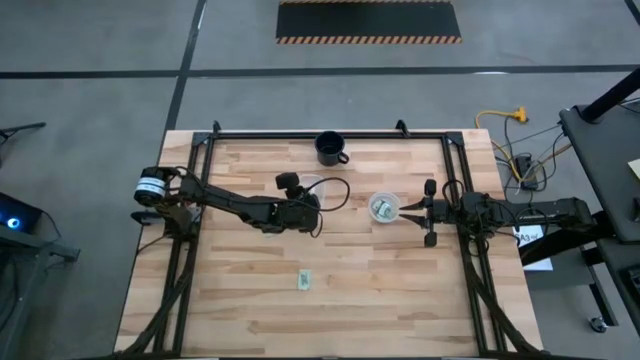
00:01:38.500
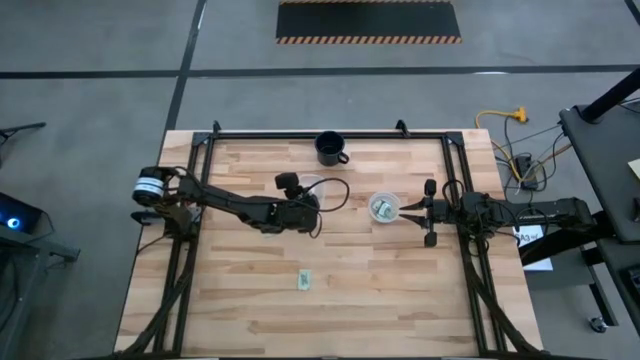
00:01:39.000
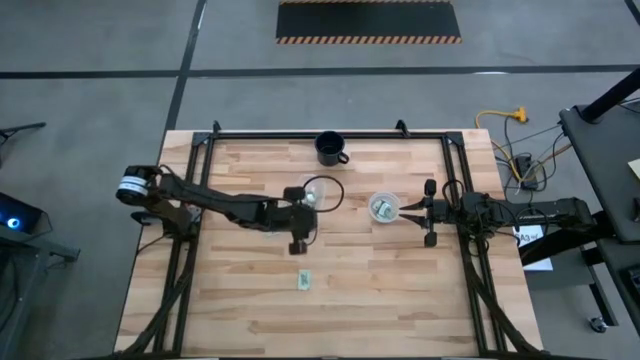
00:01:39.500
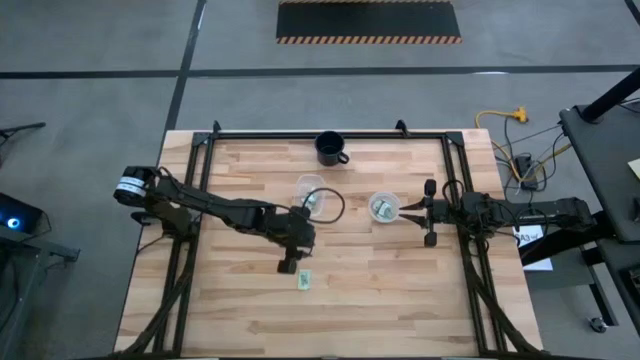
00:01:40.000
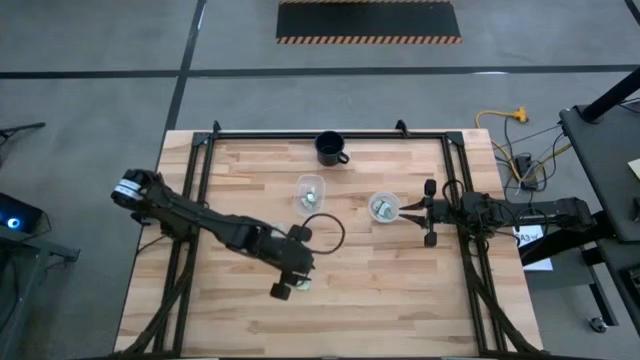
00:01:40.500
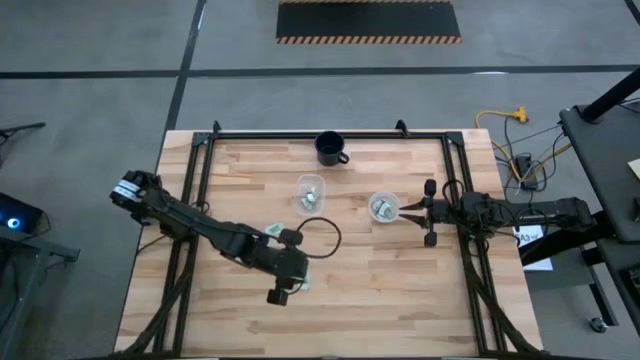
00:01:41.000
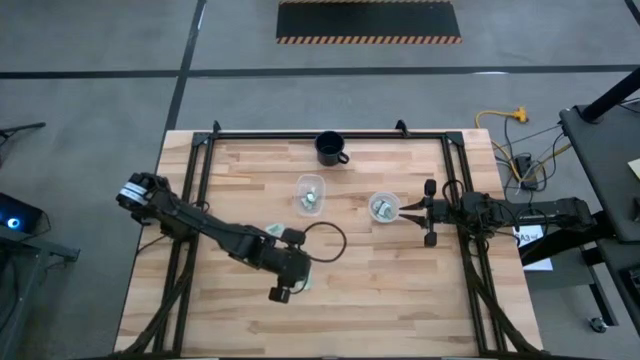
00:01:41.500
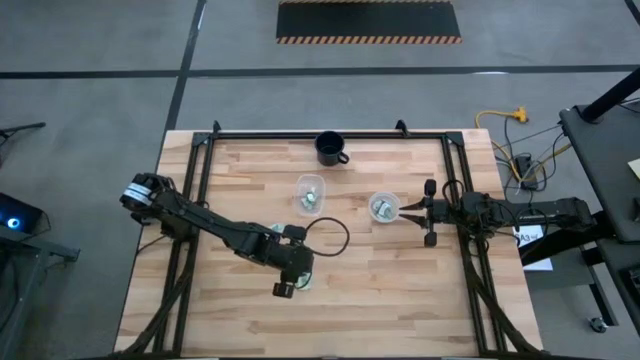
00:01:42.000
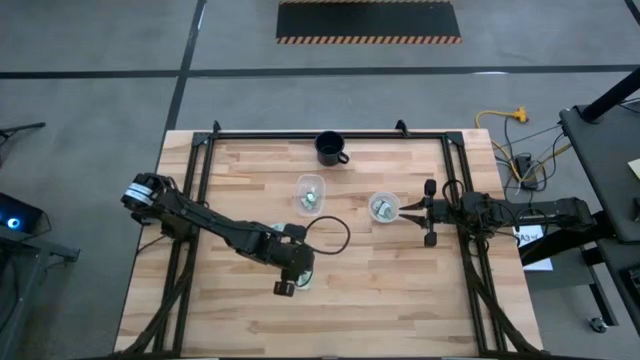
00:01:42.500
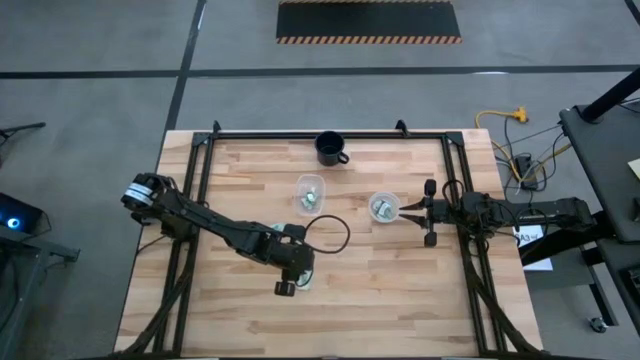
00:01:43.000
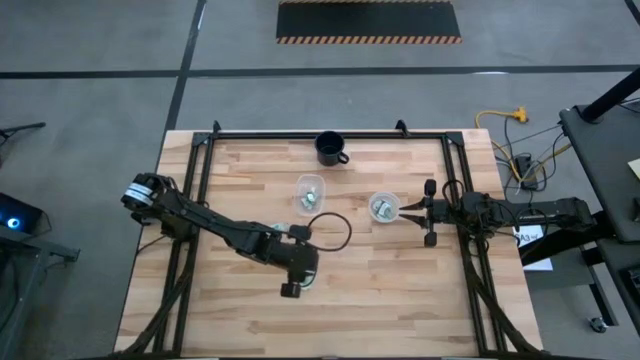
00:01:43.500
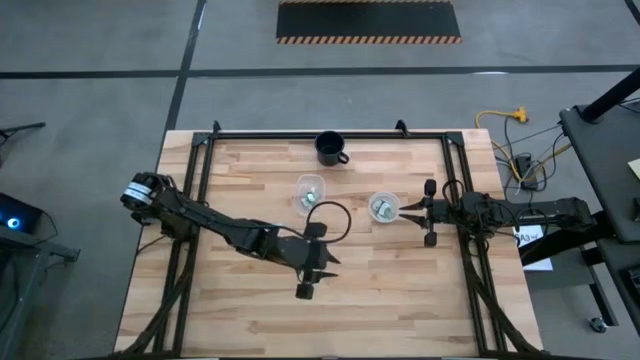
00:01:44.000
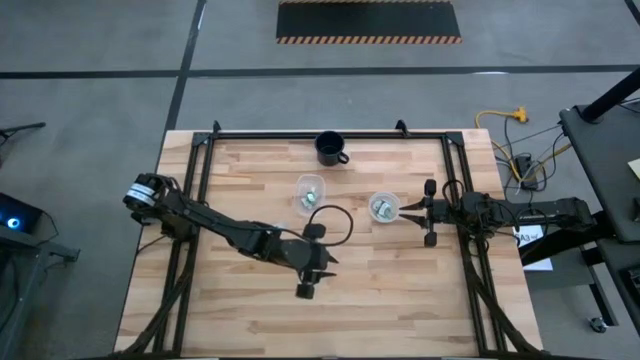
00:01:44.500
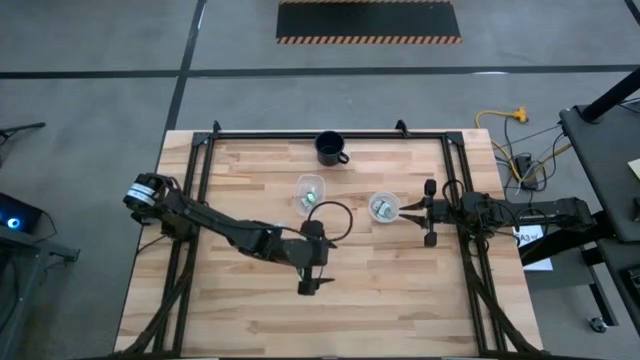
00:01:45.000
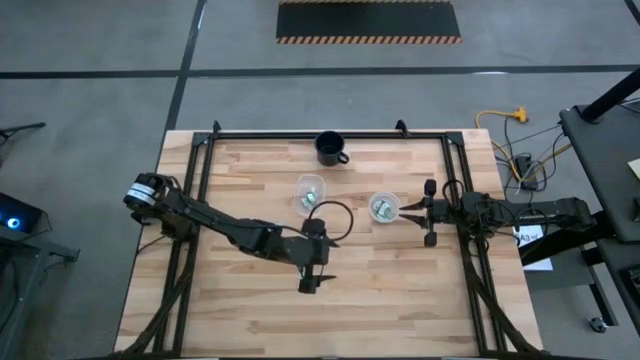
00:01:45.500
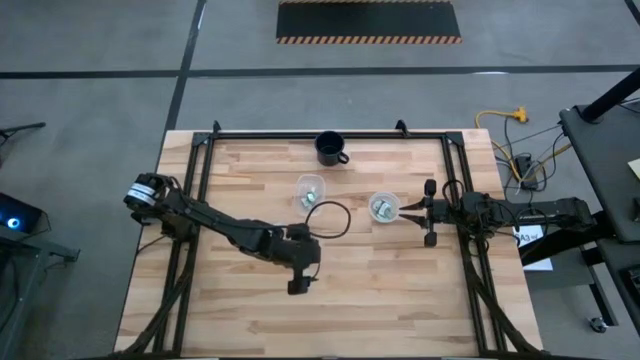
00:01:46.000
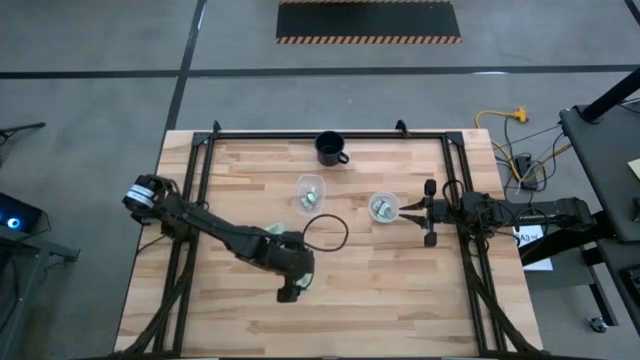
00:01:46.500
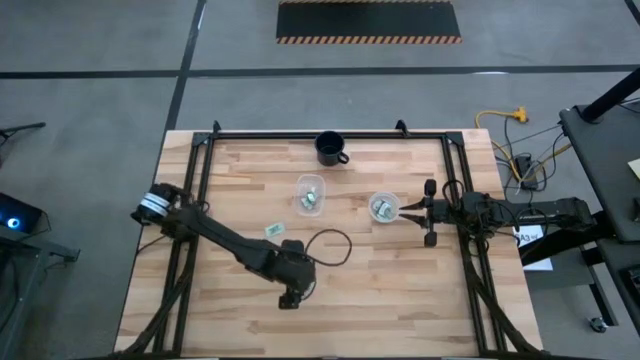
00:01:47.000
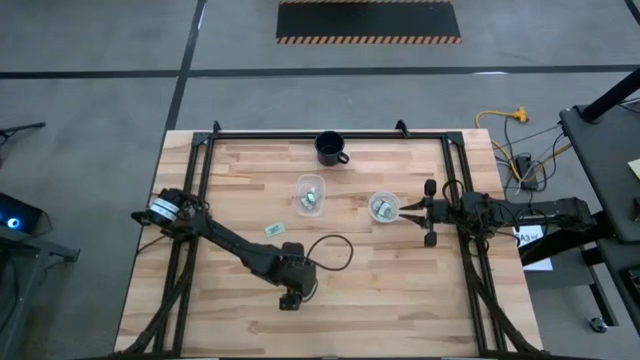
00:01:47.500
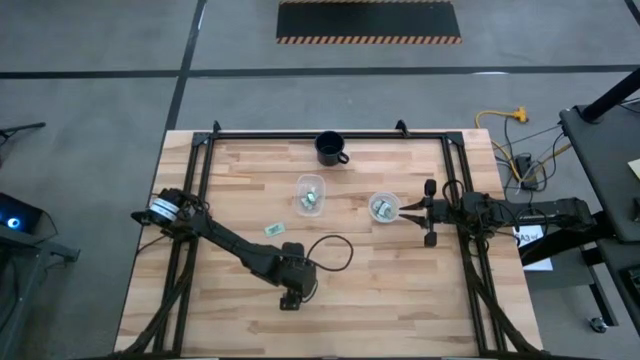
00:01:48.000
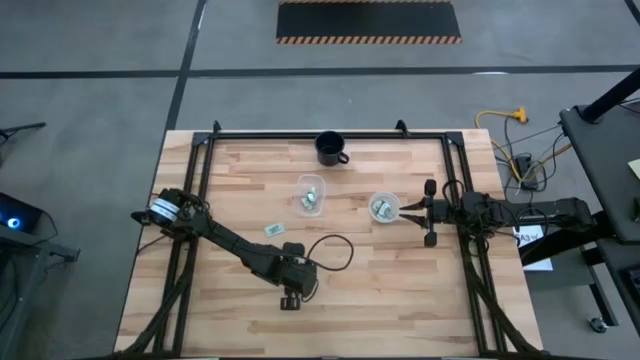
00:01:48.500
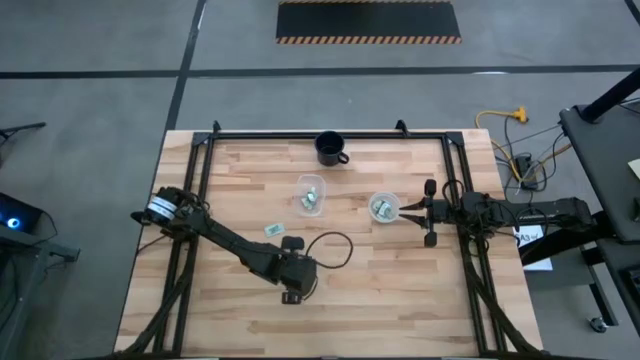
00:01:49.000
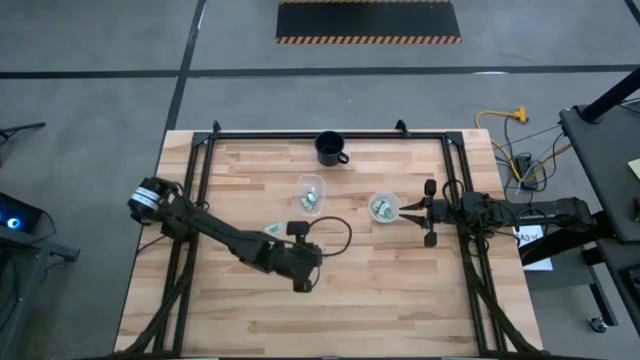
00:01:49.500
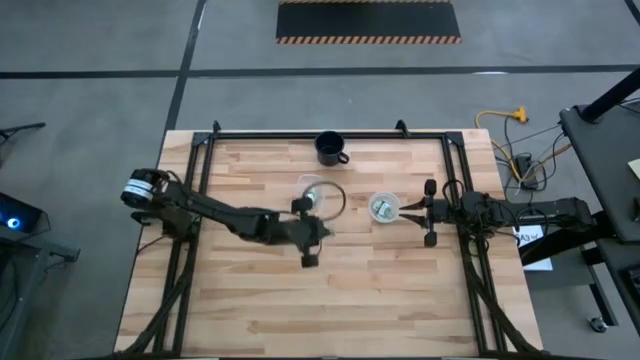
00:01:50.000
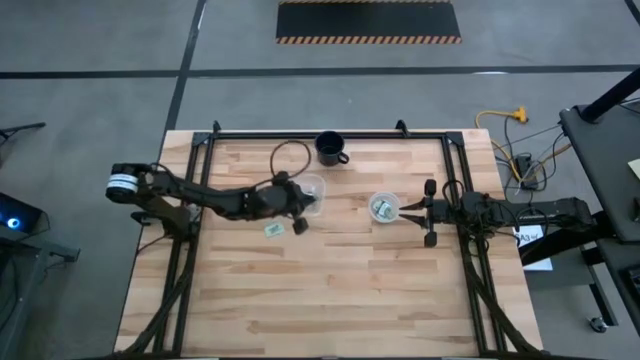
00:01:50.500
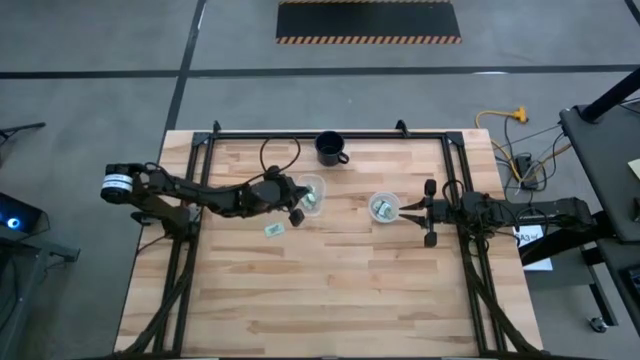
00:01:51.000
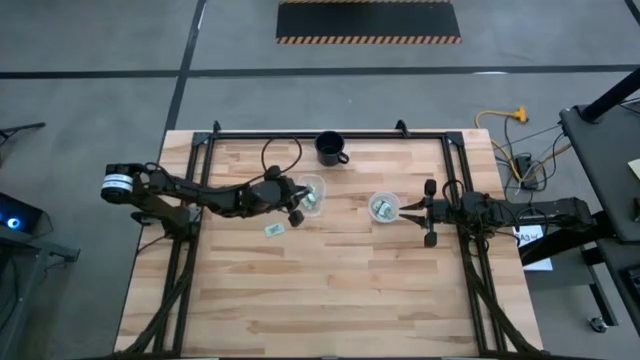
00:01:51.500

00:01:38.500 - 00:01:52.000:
Task: Pick and place items into bin
Put the white stevia packet into the left transparent bin

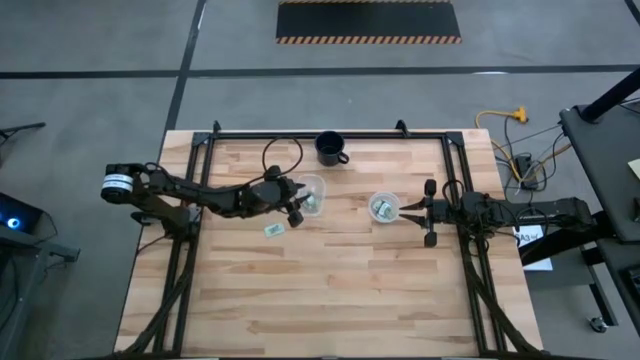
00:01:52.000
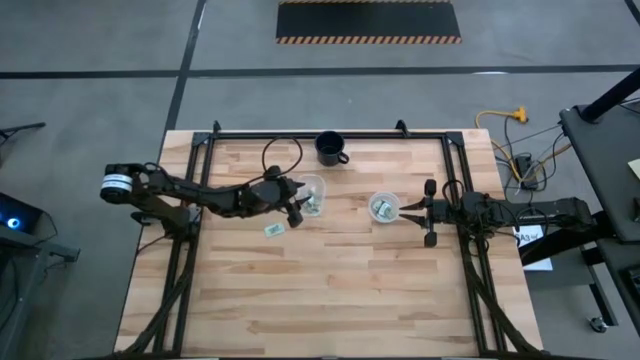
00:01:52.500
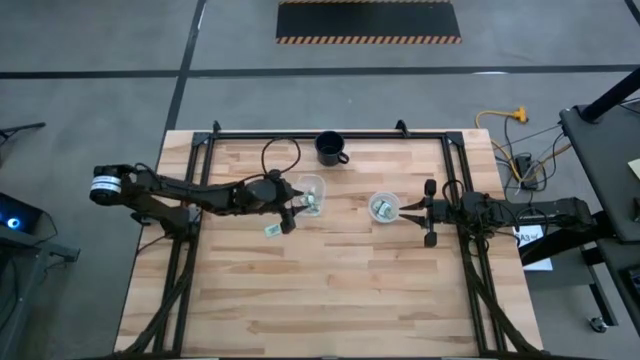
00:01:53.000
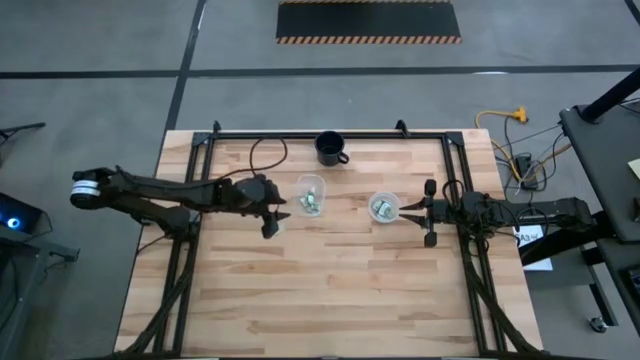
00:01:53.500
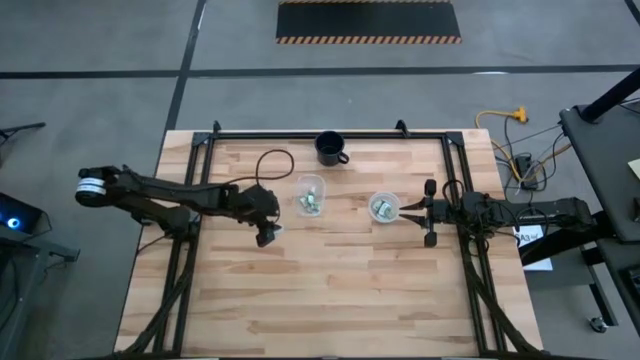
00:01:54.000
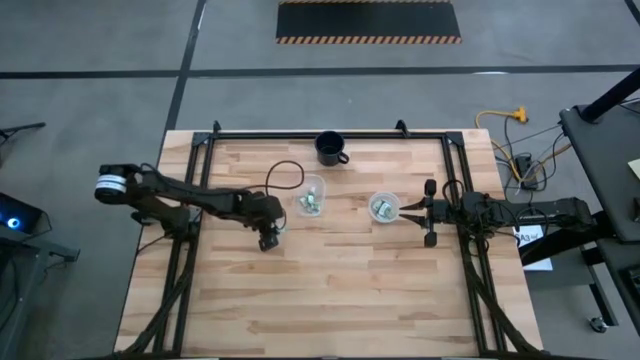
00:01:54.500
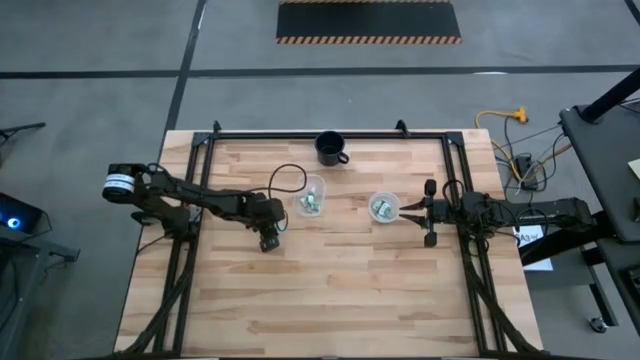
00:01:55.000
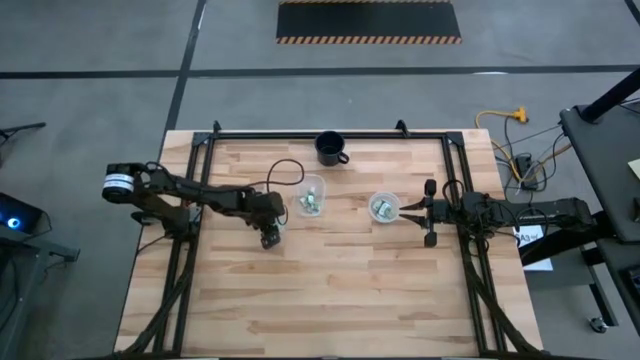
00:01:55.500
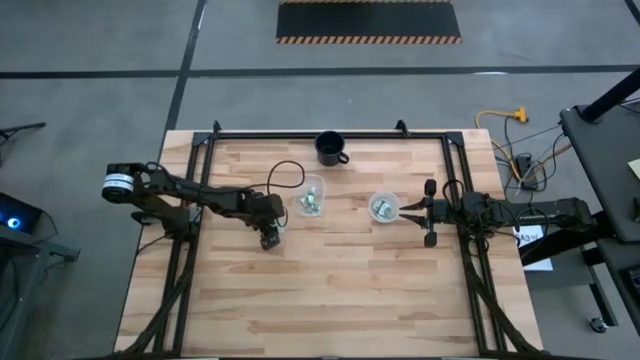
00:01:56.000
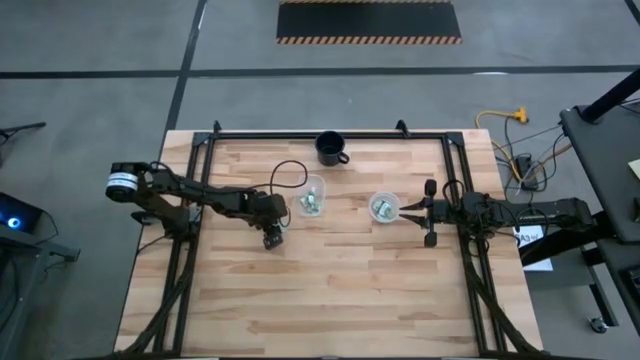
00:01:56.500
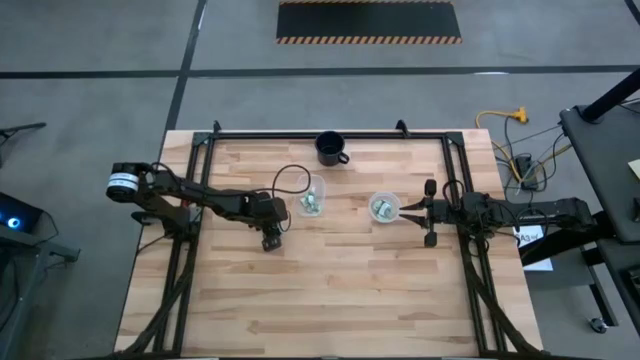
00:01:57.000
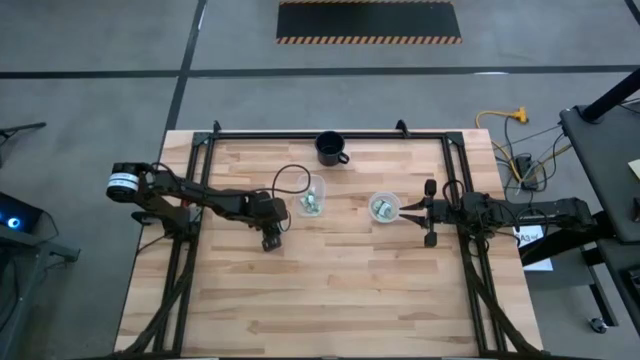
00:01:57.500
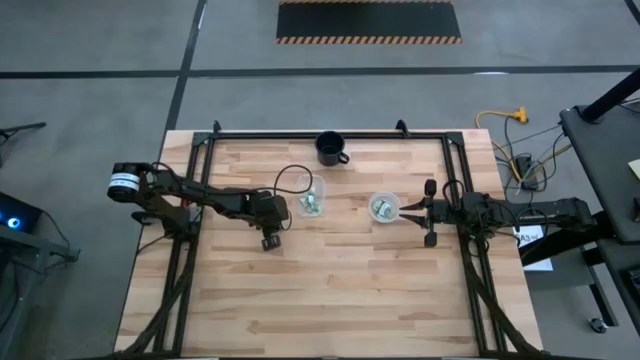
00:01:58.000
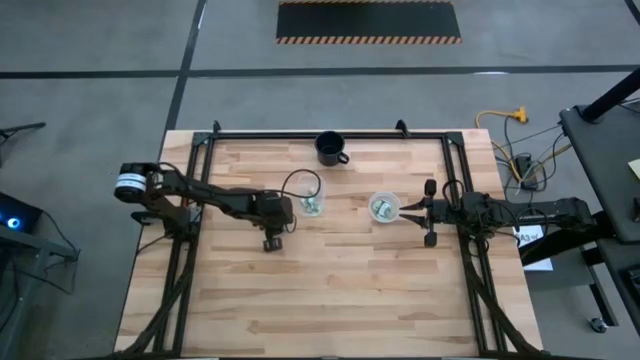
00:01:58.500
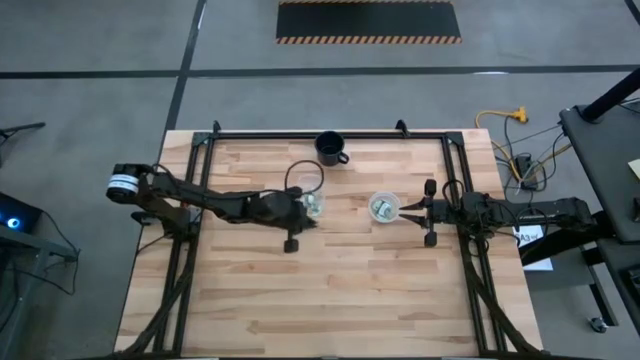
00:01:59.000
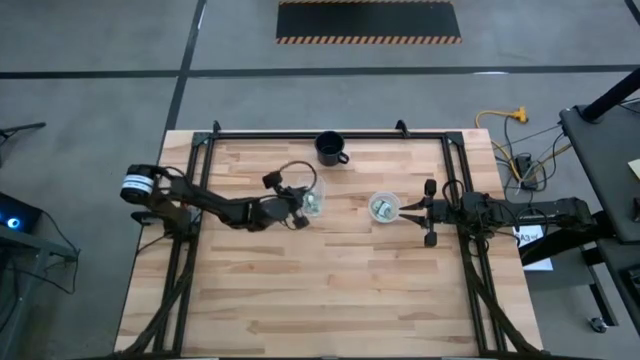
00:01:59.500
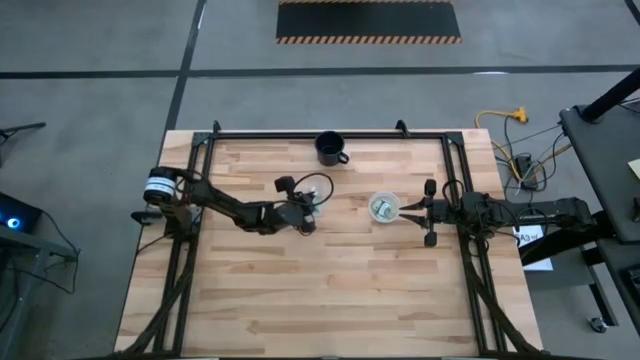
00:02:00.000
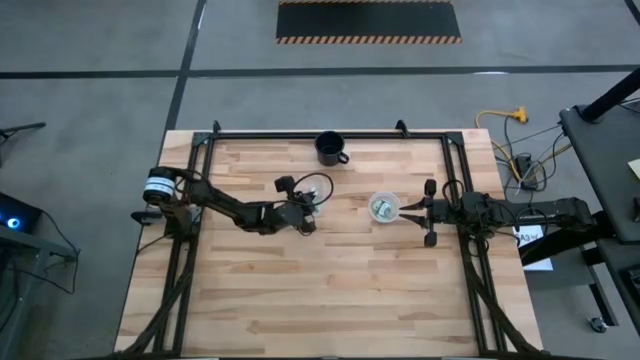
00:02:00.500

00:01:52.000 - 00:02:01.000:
Put the green stevia packet into the left transparent bin
